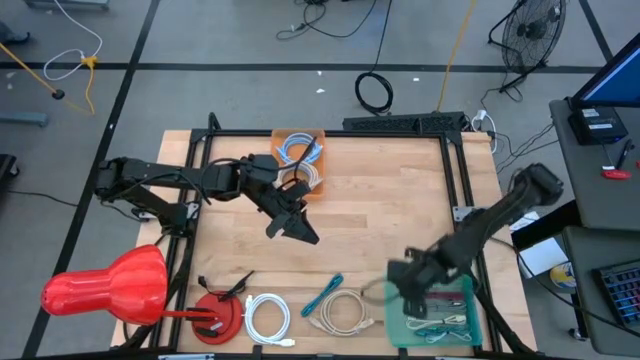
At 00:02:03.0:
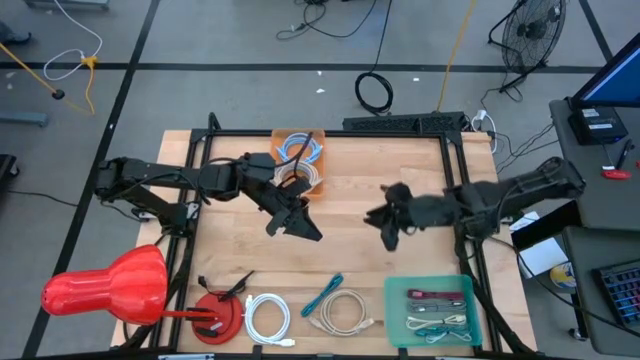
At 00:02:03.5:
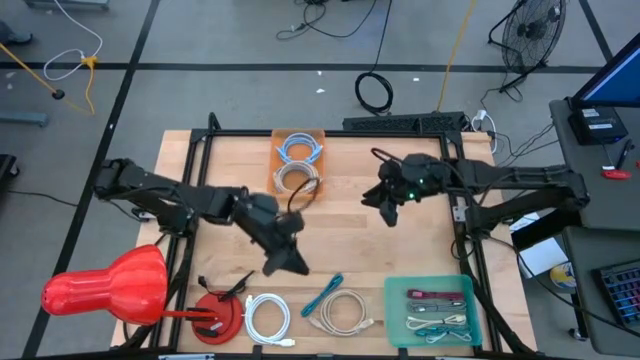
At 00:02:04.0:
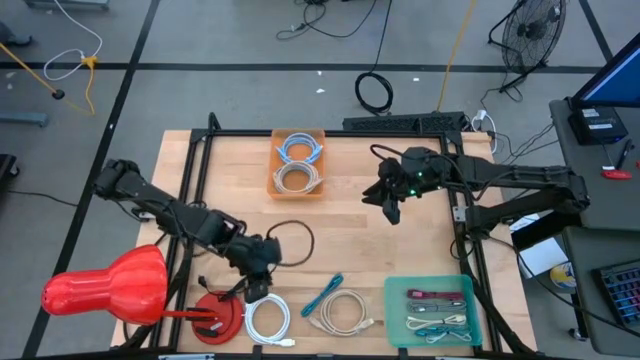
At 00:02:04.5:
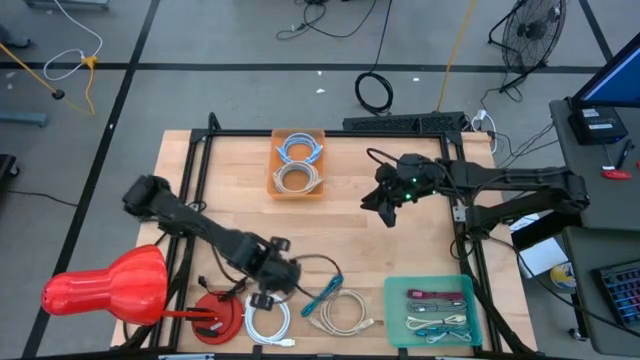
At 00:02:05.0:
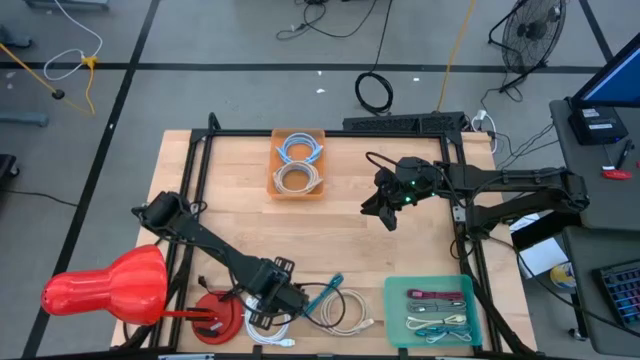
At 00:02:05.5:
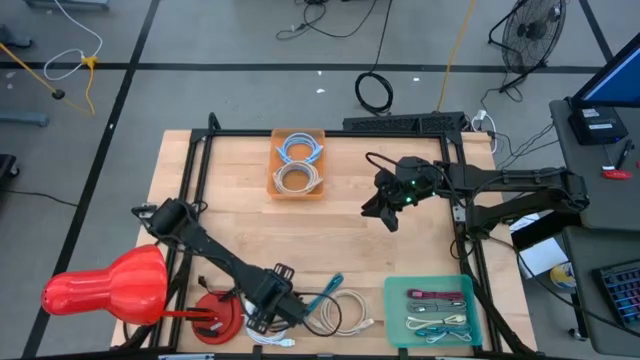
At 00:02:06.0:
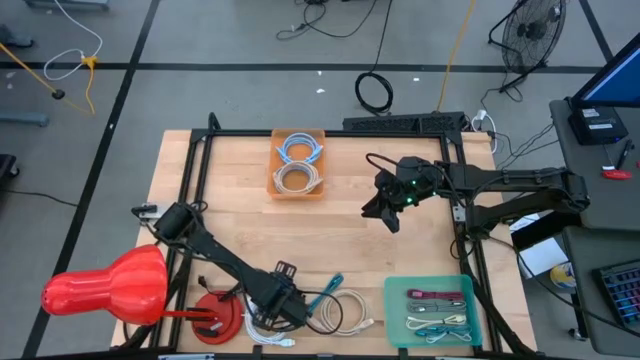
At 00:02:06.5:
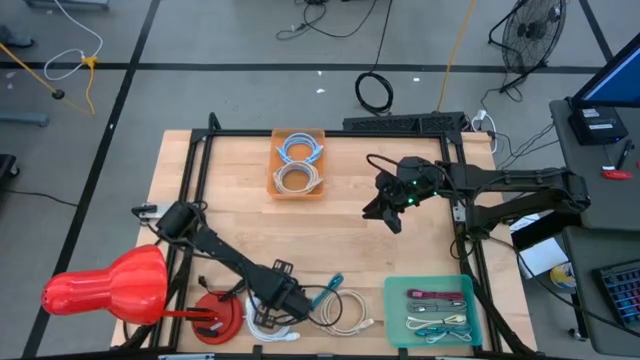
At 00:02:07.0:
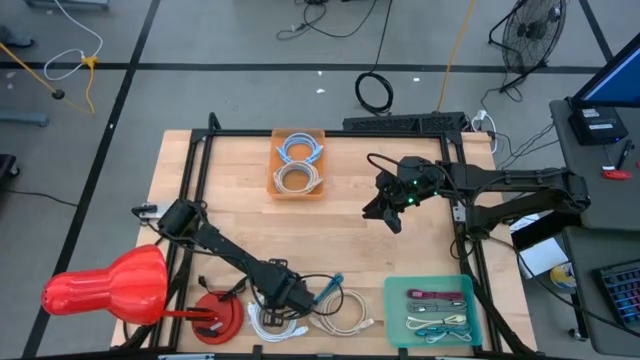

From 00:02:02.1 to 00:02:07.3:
Task: Pick & Place USB Port
Put the white usb cable into the orange bin

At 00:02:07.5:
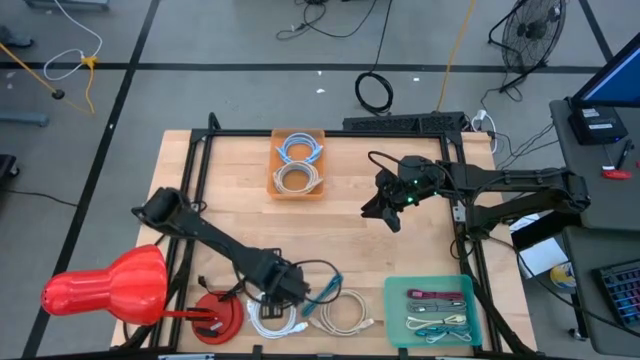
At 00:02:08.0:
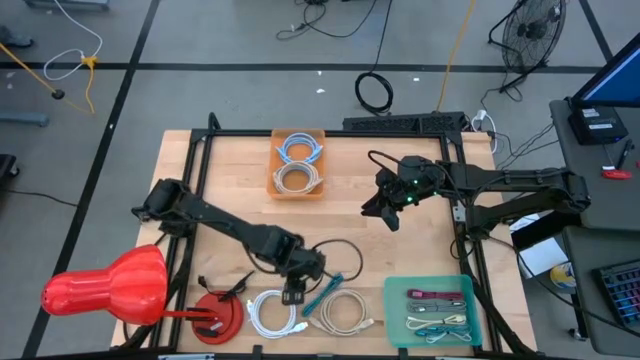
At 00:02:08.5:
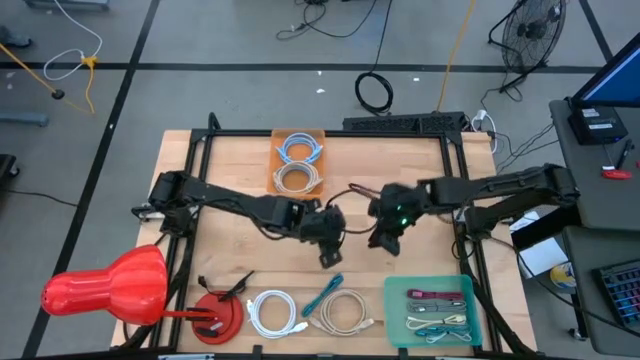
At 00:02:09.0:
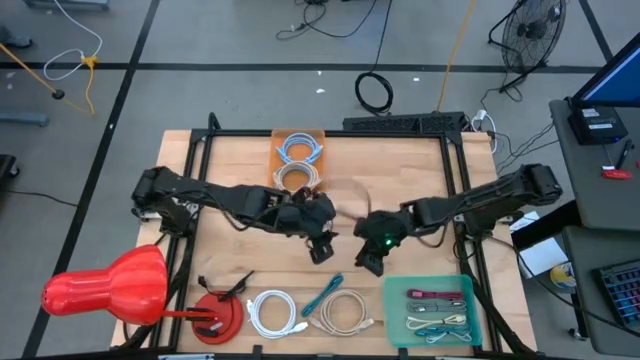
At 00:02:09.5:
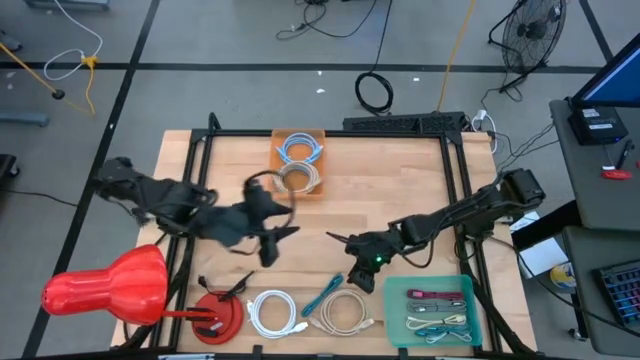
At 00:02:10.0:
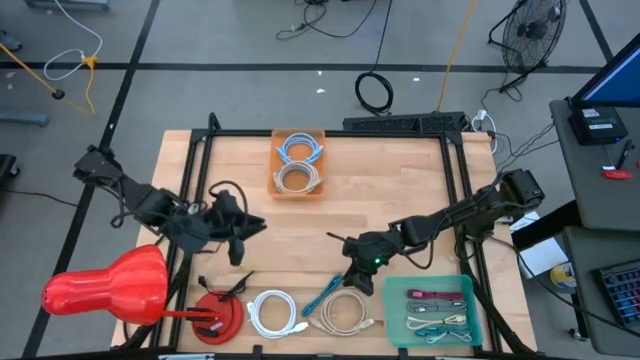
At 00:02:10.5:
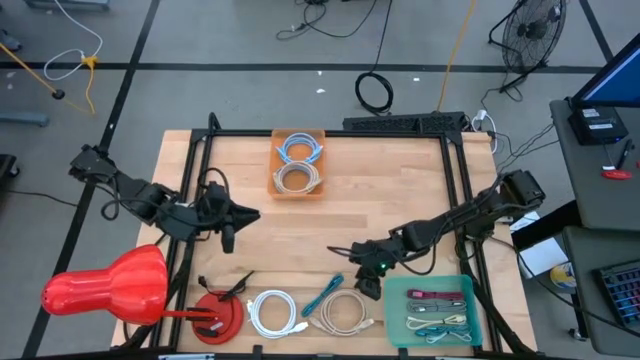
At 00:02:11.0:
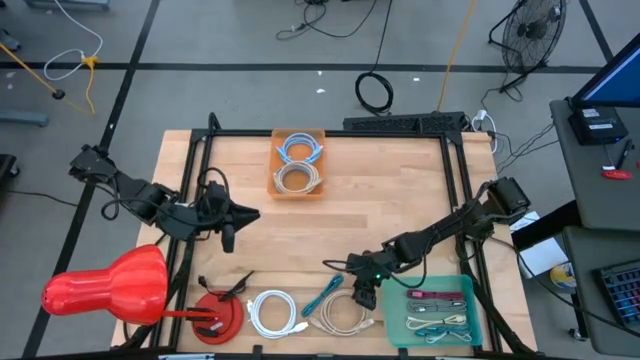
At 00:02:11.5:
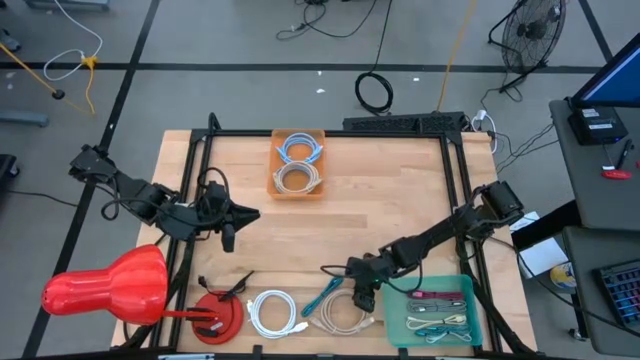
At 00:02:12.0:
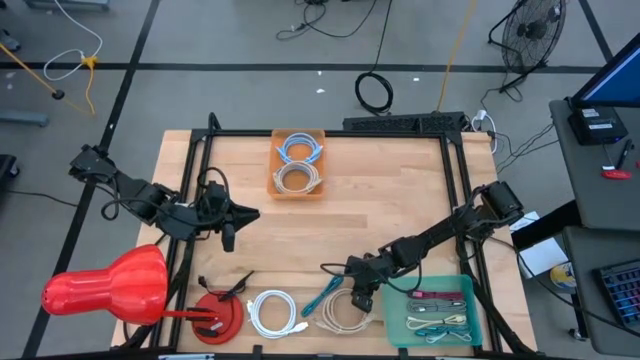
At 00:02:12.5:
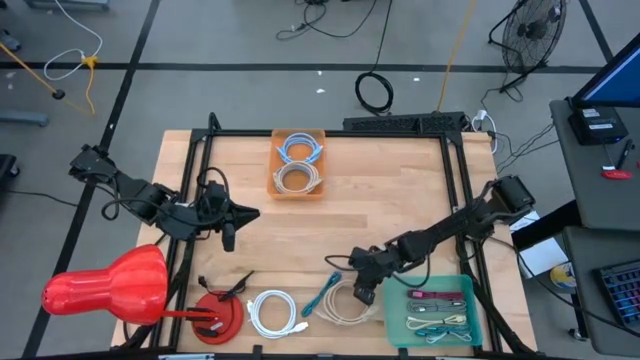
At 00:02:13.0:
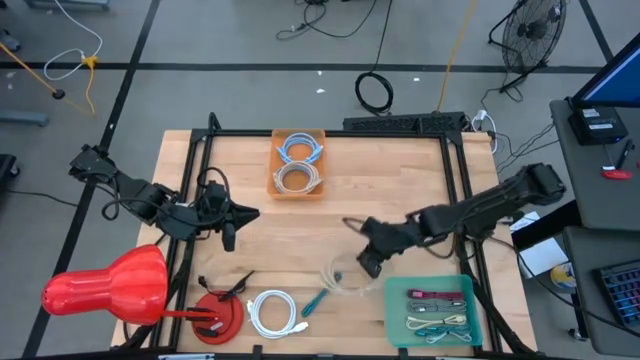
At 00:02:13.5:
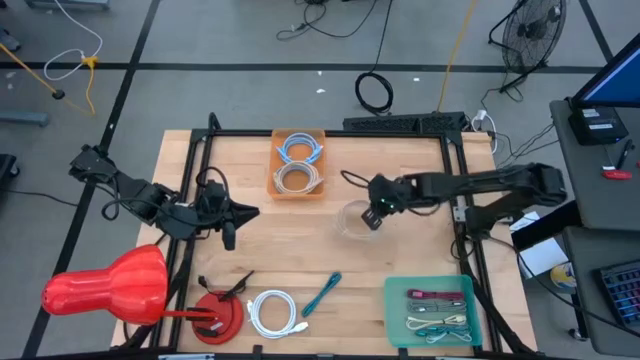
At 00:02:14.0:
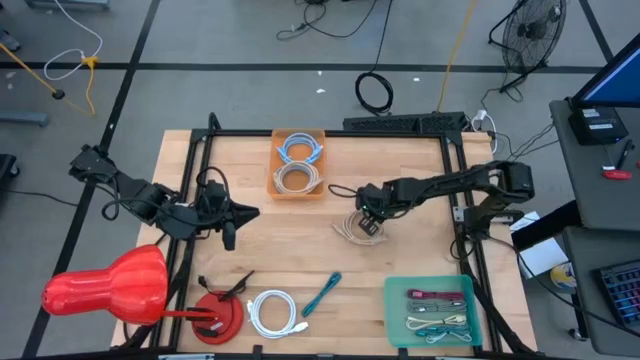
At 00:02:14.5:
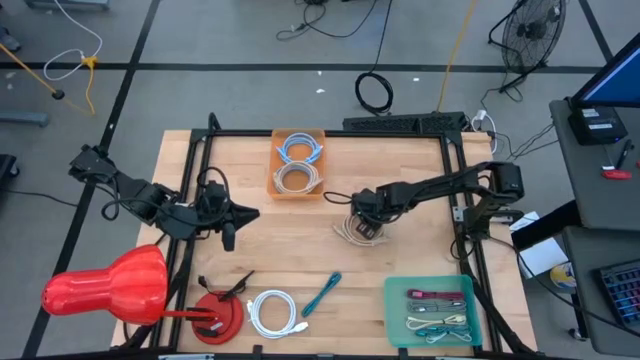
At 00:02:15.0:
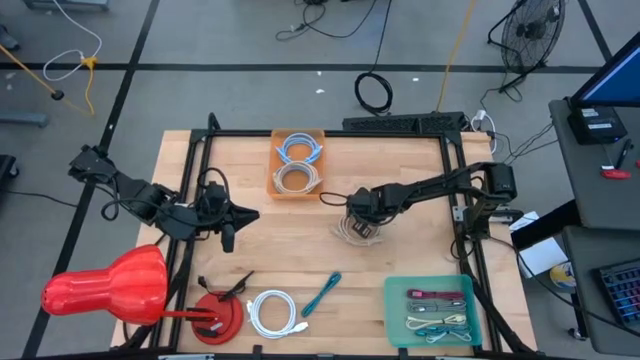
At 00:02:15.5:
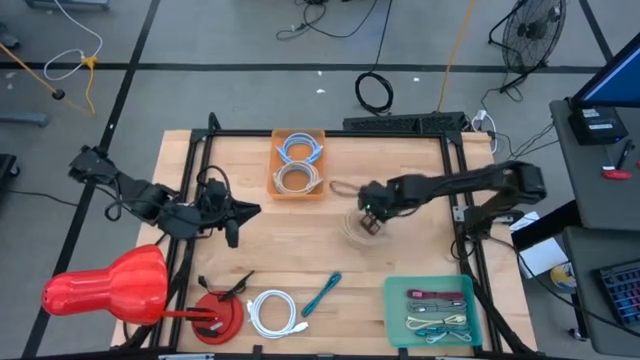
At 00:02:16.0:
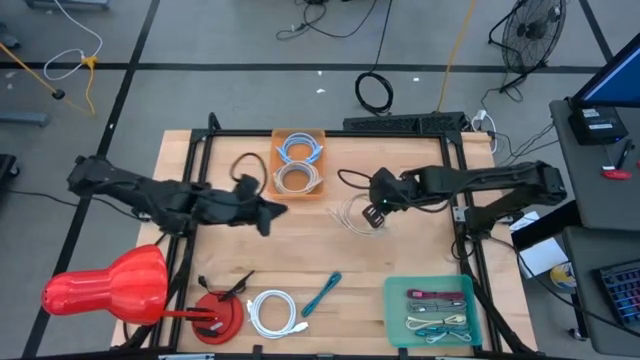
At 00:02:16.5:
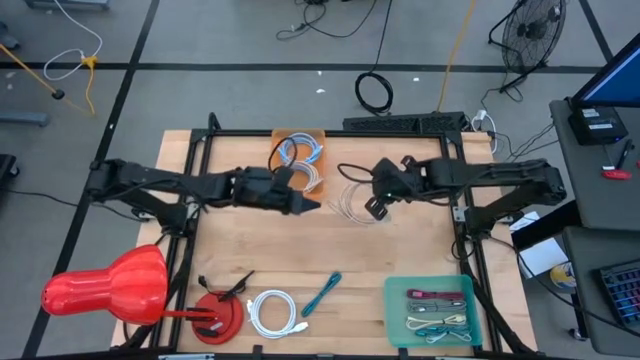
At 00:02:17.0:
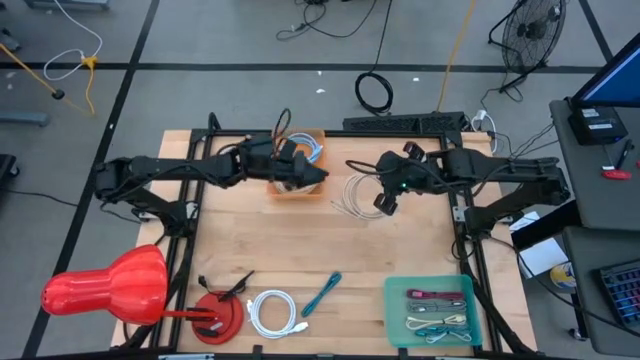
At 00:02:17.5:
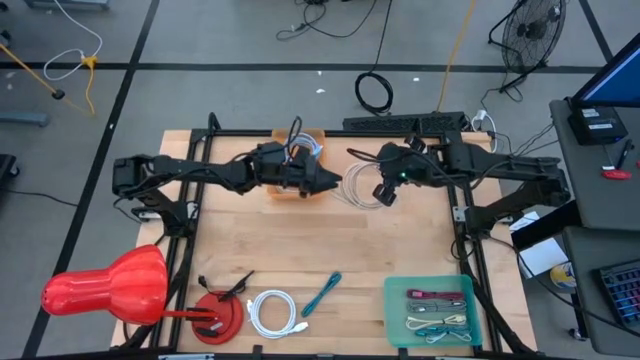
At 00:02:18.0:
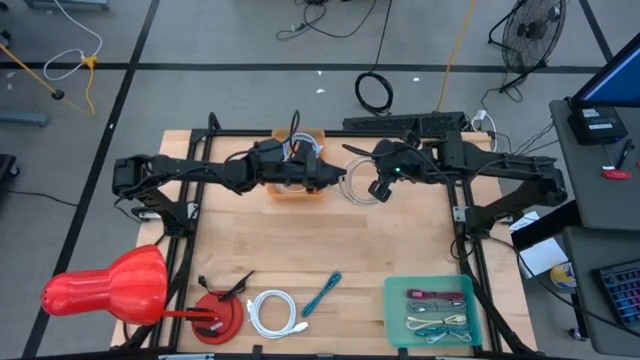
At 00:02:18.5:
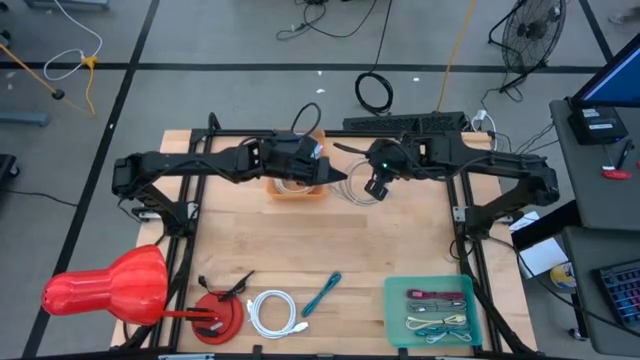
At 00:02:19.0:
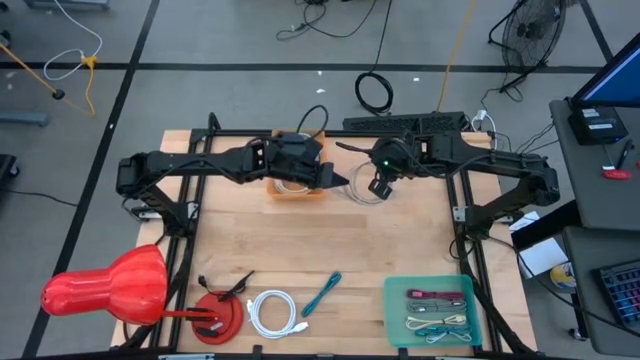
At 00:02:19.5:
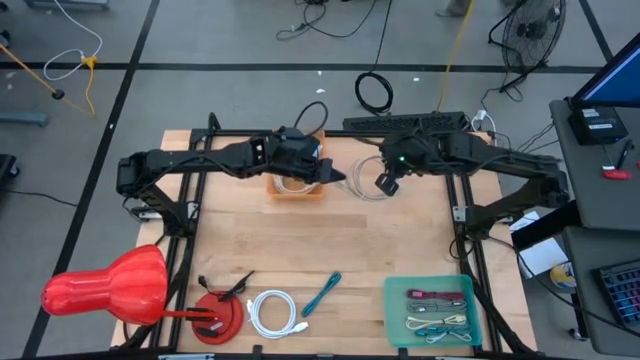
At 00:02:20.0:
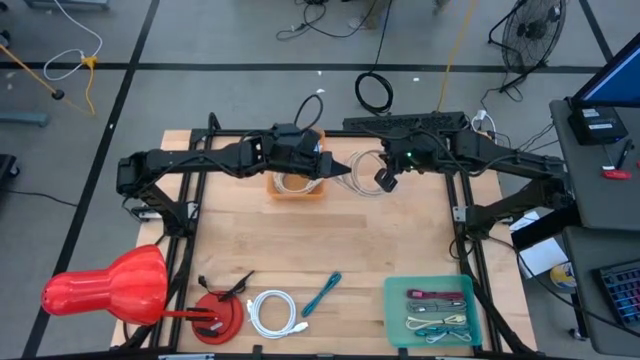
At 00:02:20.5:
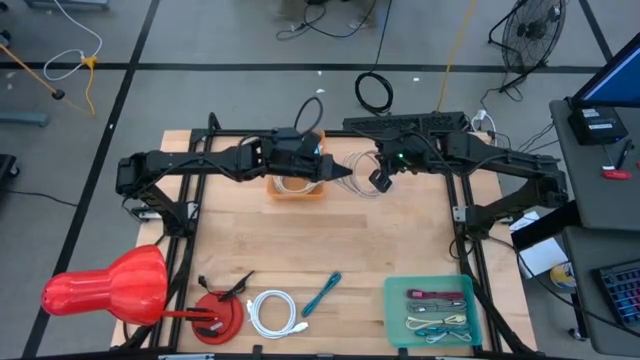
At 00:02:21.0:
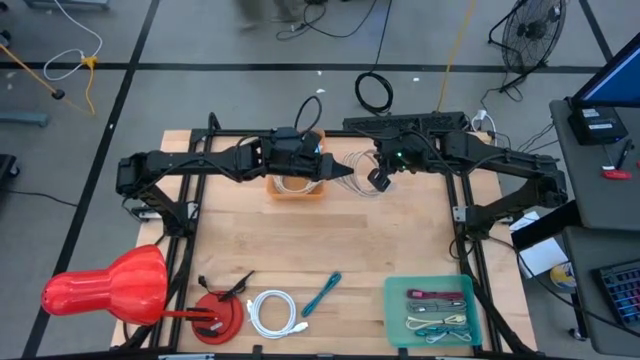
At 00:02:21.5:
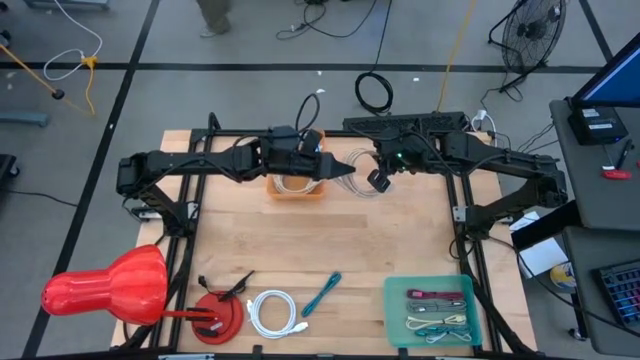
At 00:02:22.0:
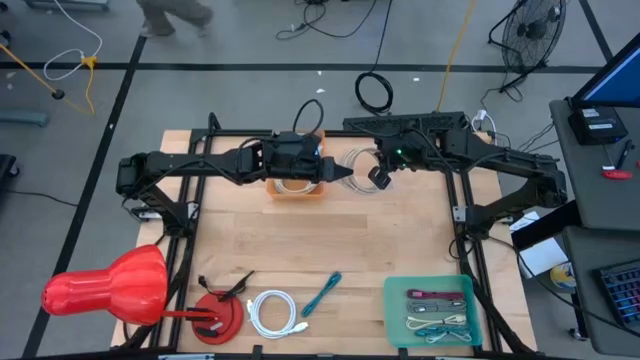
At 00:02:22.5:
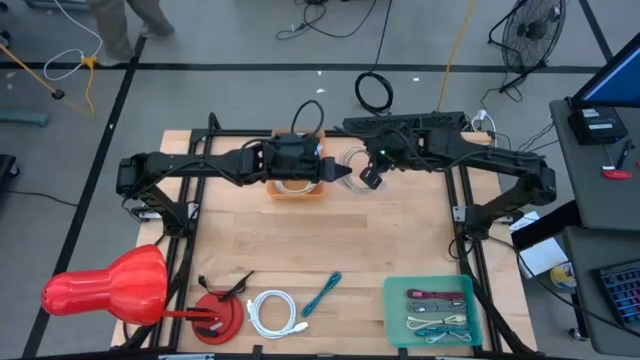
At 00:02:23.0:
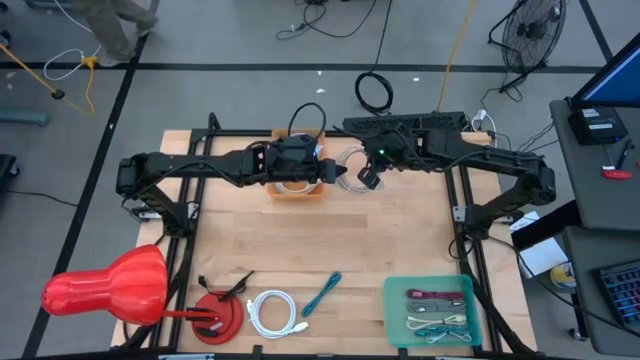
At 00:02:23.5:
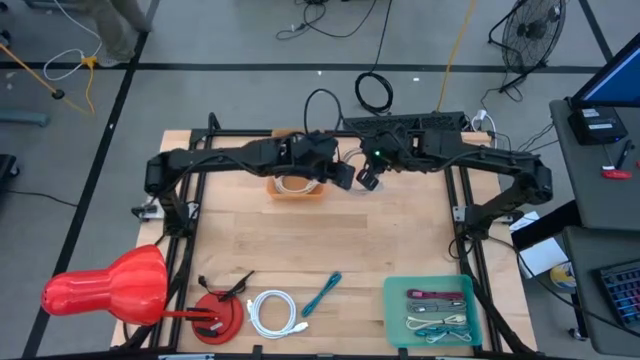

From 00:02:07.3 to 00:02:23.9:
Put the brown usb cable into the orange bin
